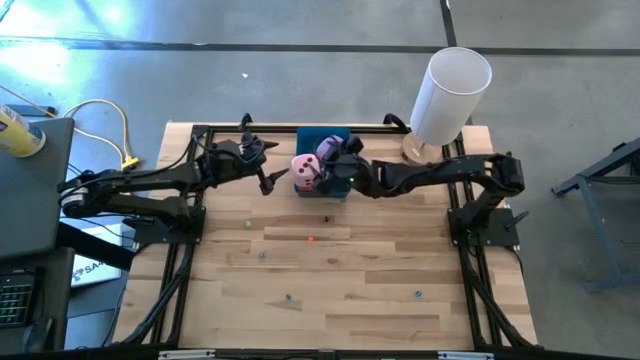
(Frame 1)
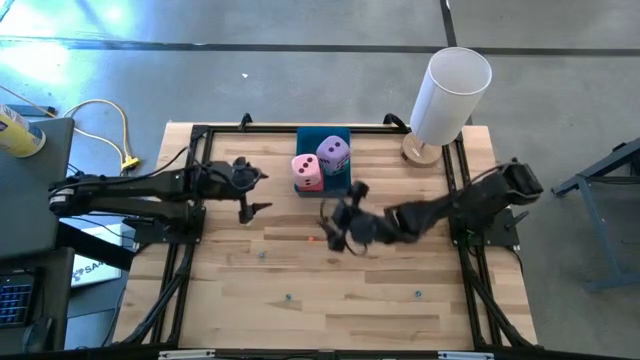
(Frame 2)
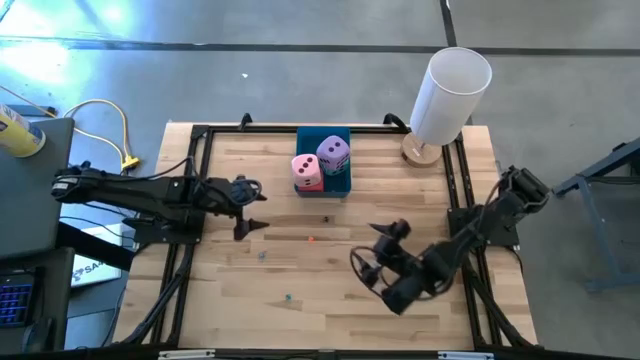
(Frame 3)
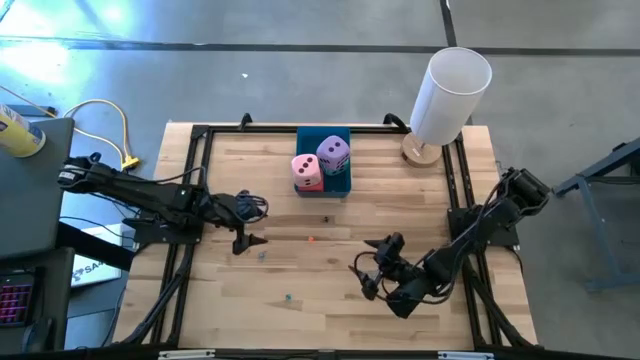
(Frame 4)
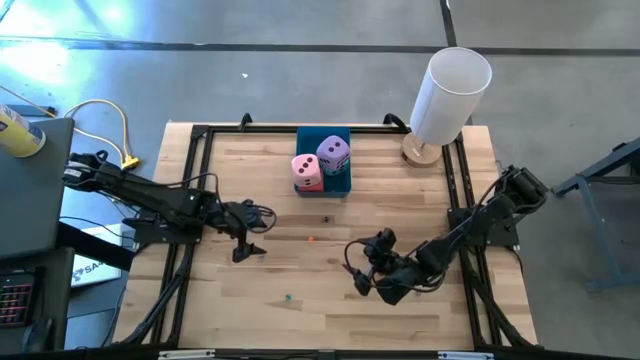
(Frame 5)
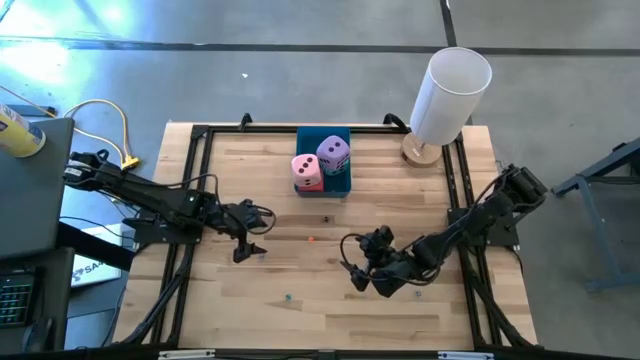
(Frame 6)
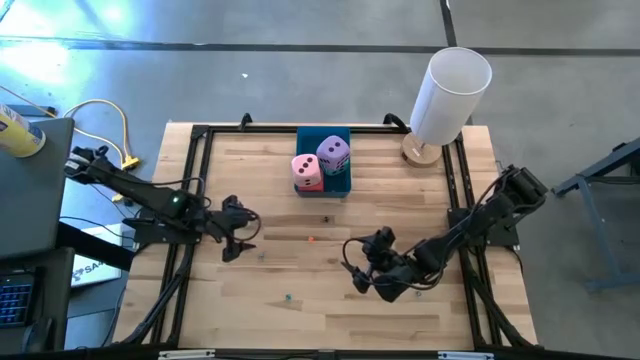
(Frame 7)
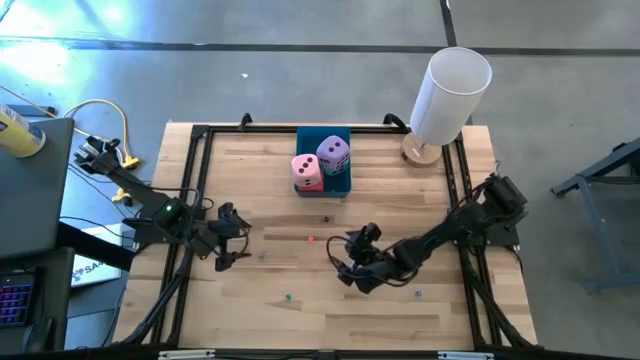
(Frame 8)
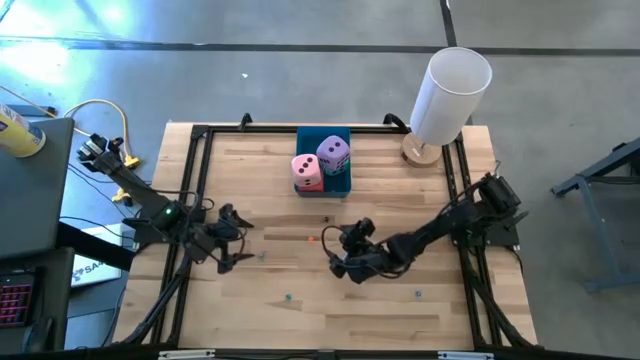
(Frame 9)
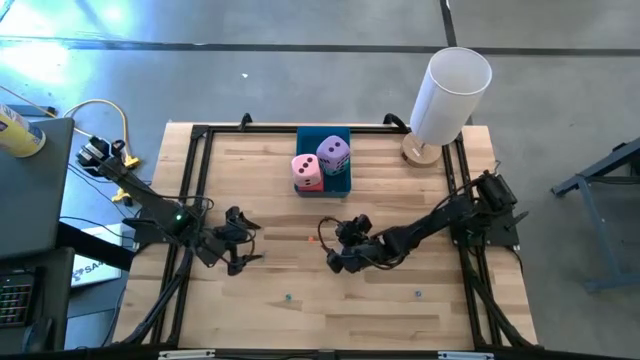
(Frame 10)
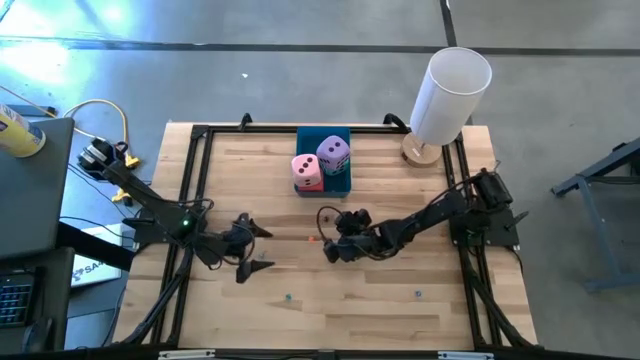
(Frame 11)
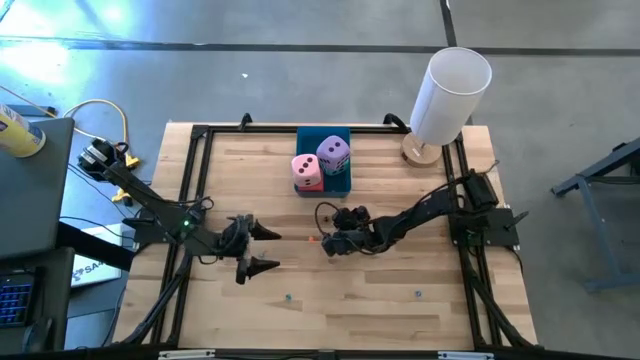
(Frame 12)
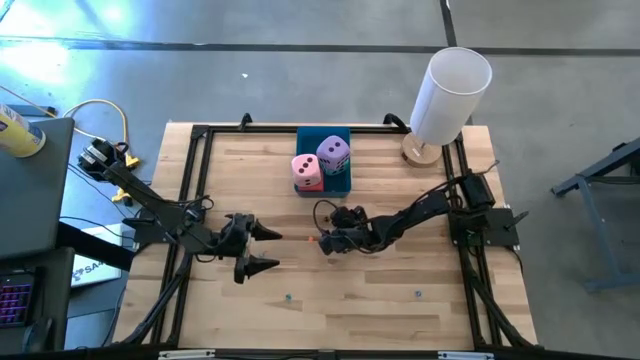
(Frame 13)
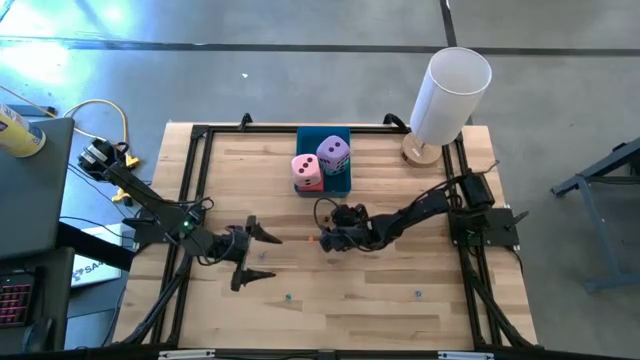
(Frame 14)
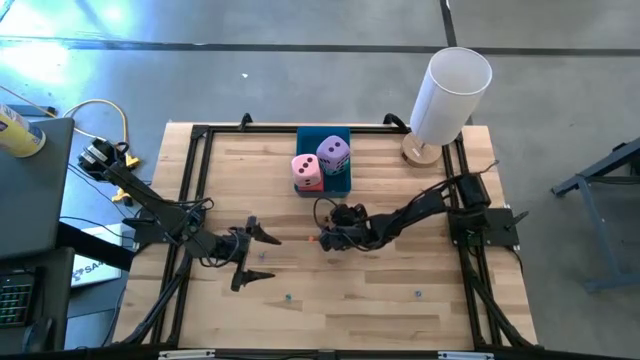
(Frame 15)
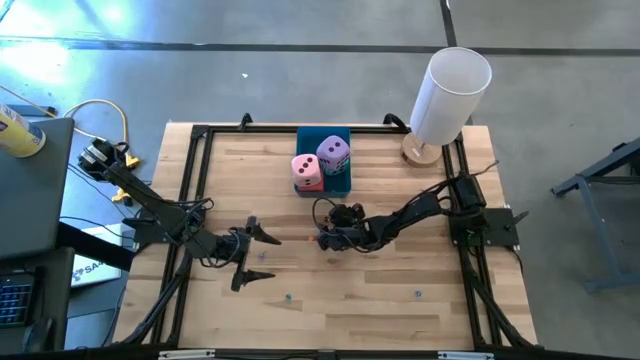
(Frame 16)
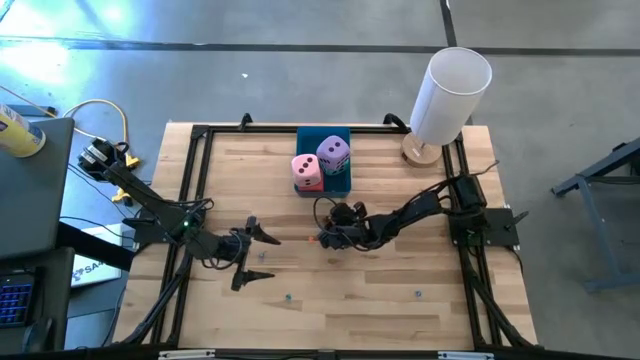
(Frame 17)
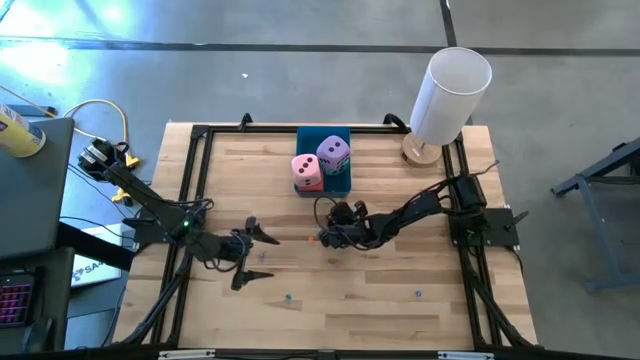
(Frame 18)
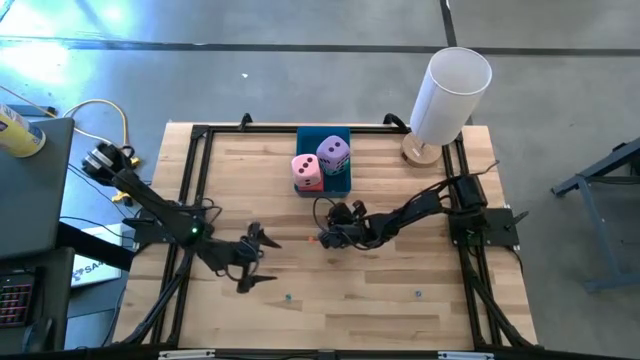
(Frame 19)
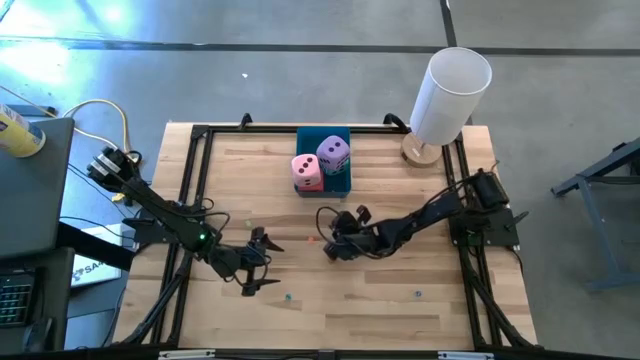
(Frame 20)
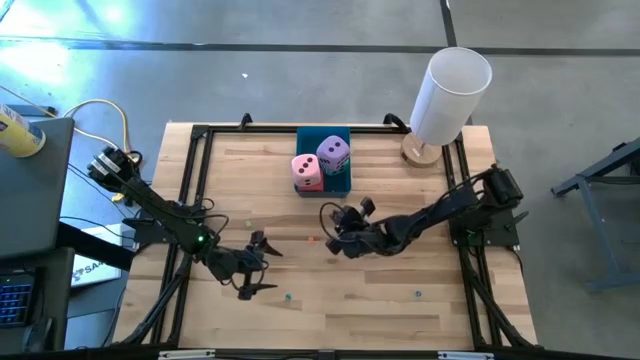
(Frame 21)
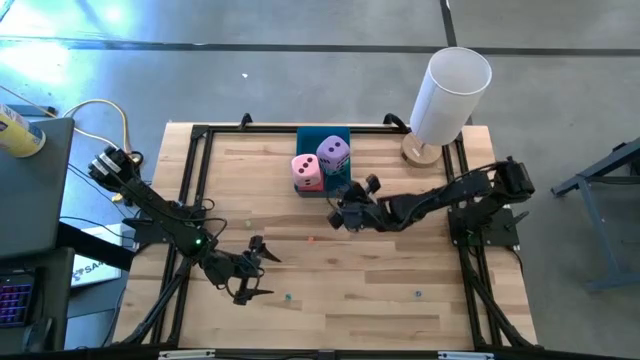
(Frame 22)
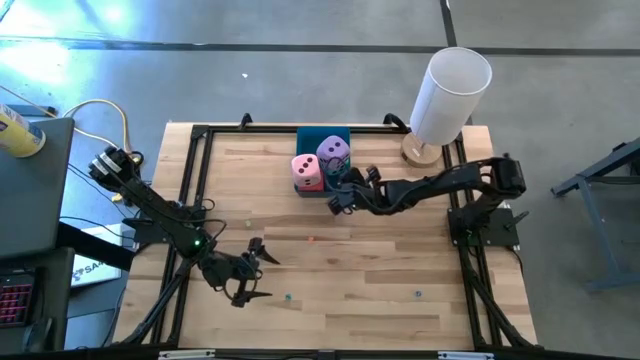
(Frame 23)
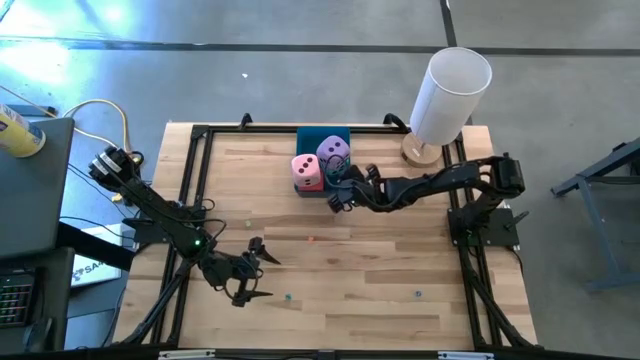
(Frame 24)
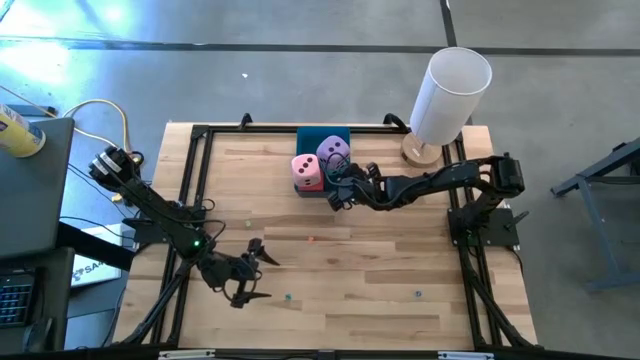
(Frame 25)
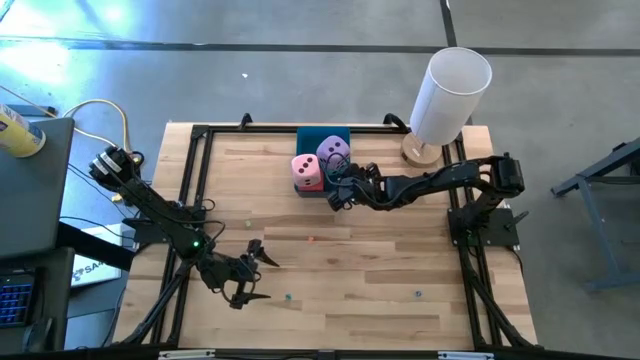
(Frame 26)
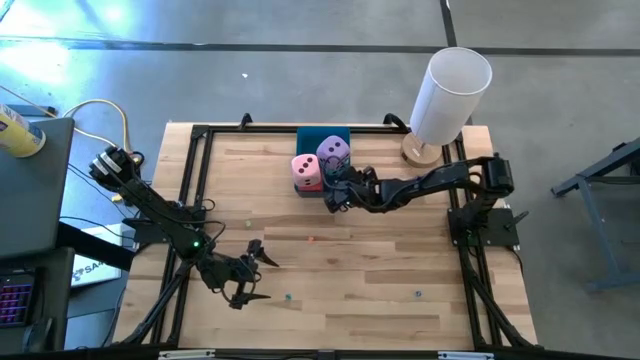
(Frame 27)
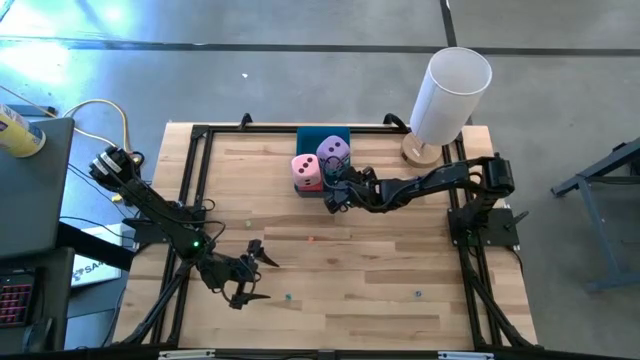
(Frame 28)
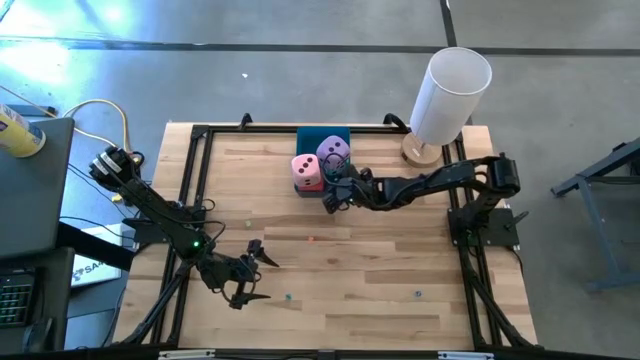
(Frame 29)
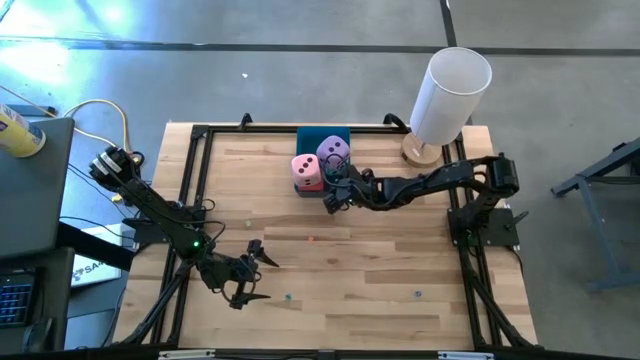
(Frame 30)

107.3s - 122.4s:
Task: Pick & Place Dice
Put the black die into the blue bin

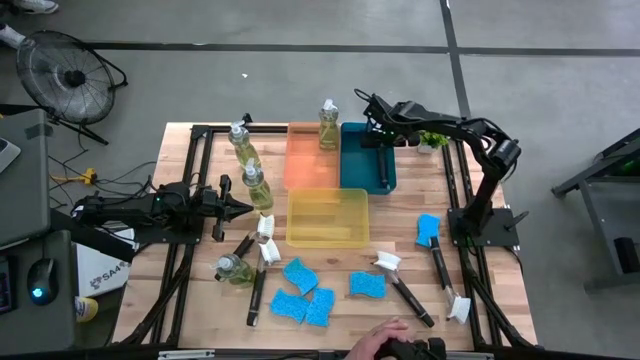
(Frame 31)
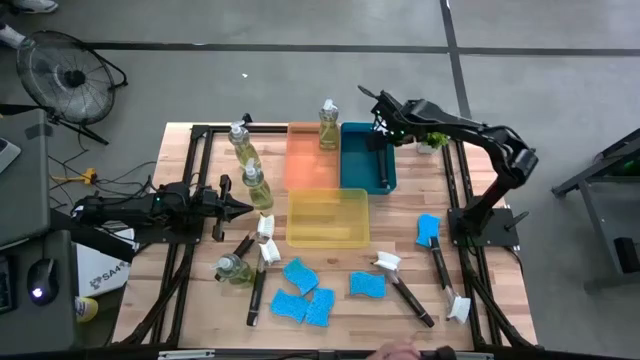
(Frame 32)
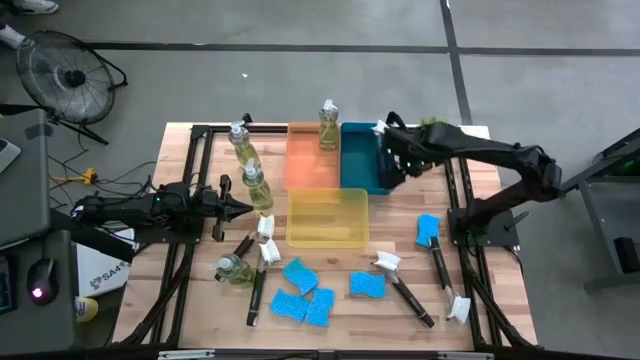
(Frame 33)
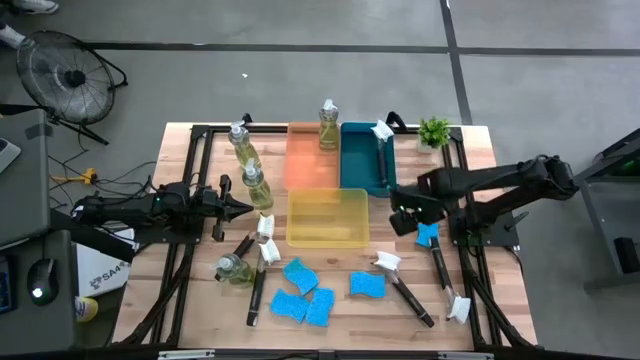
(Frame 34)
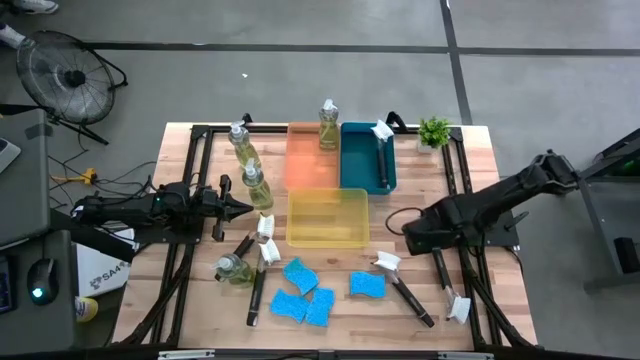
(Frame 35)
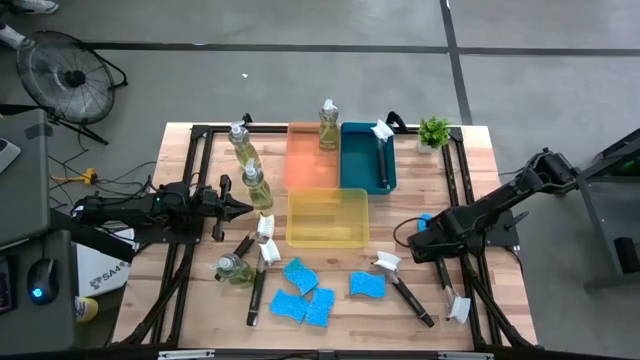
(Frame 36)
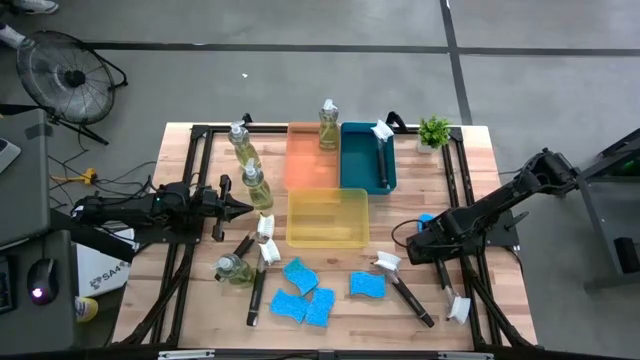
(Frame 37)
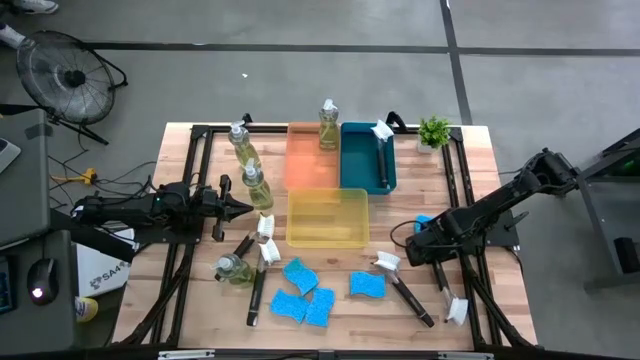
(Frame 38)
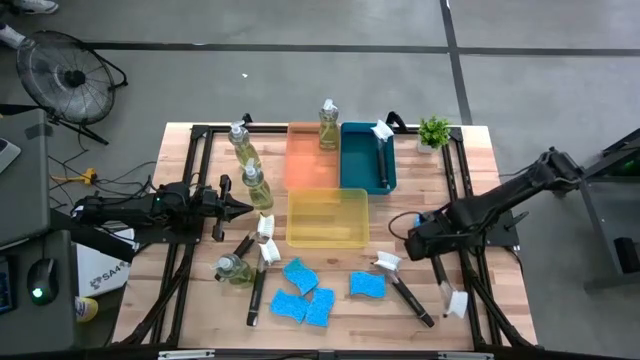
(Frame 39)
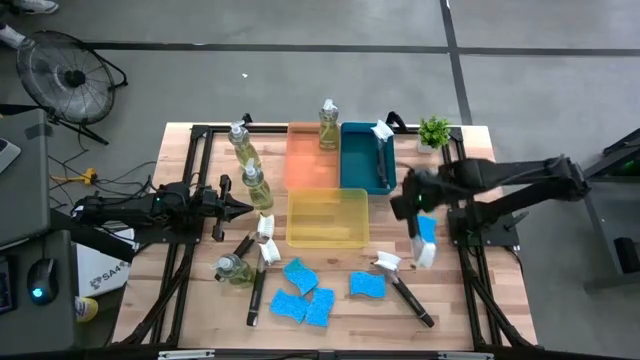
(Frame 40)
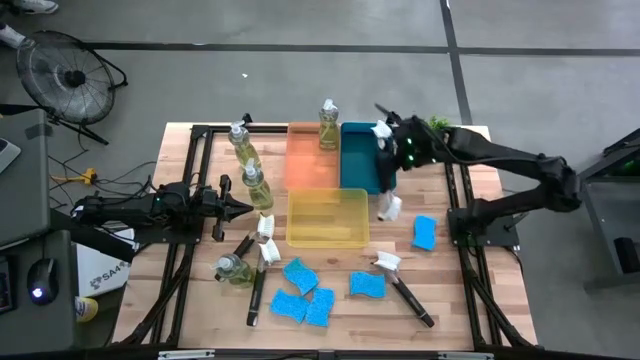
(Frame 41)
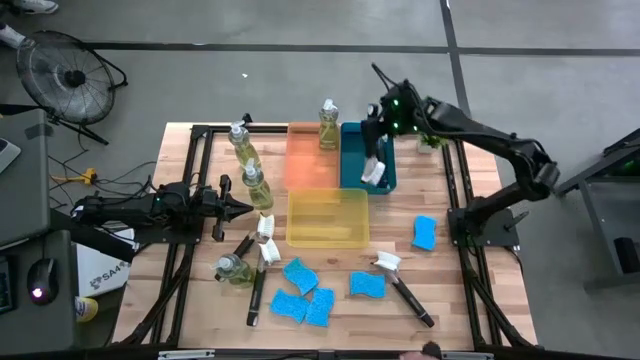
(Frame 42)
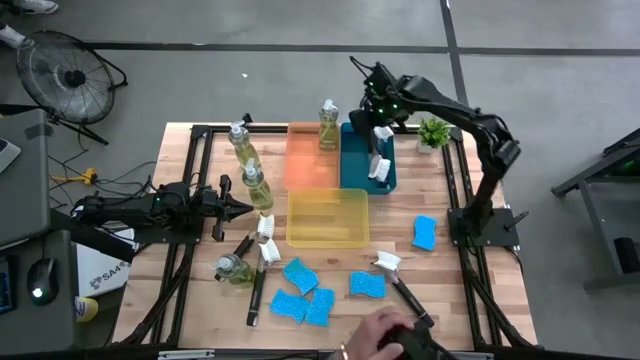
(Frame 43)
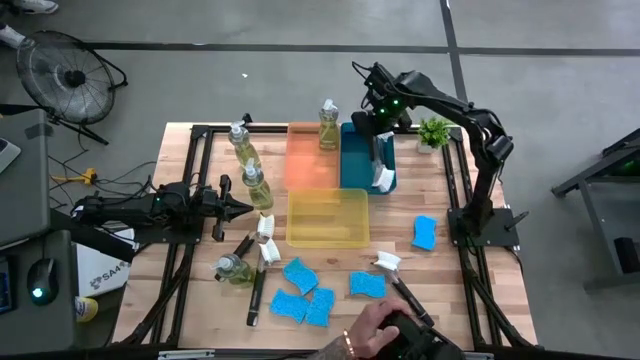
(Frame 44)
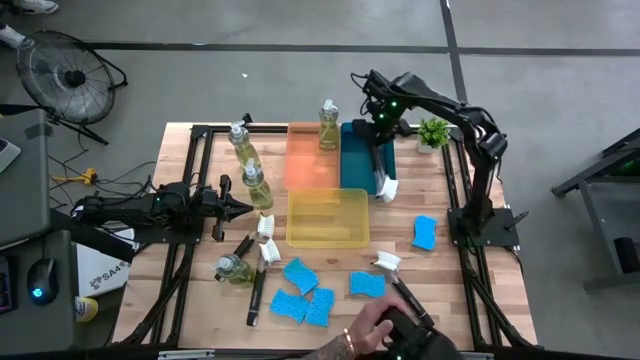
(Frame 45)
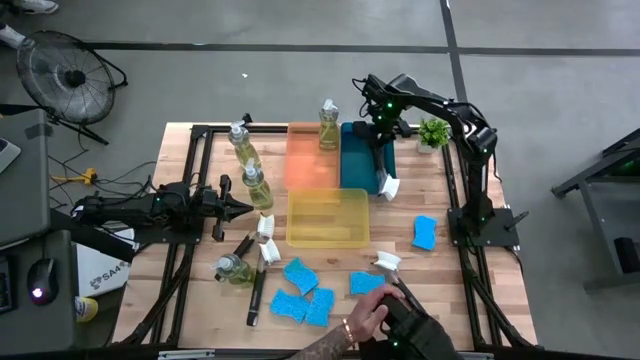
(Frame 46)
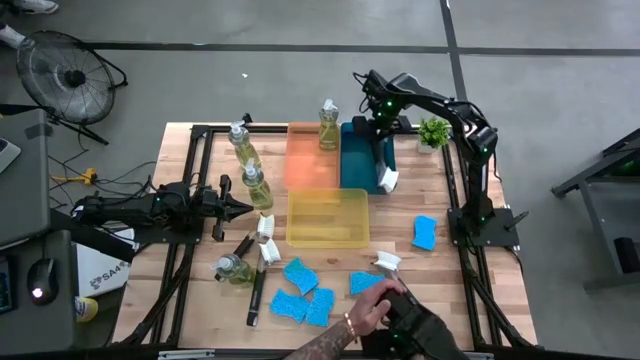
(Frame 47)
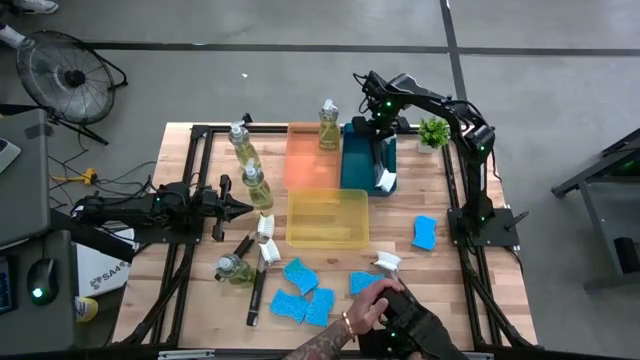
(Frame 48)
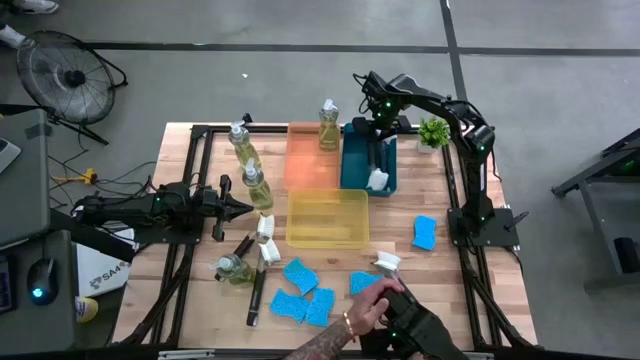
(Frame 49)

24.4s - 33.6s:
Task: Pick & Place Kitchen Sink Supplies
Put the dish brush into the blue bin
